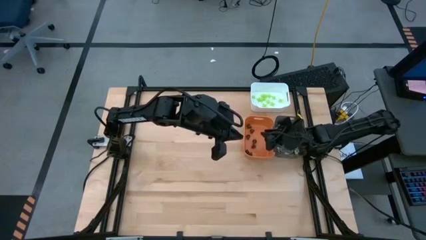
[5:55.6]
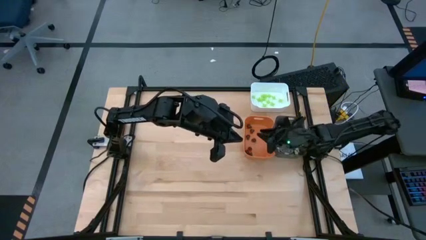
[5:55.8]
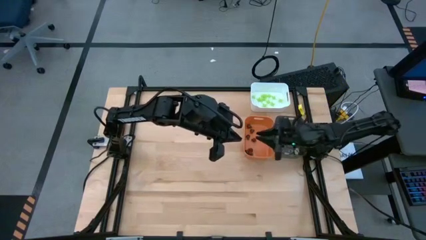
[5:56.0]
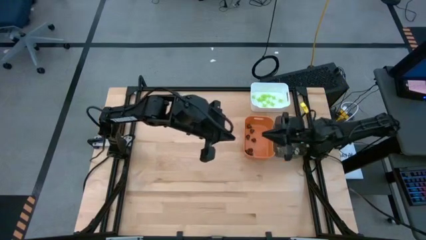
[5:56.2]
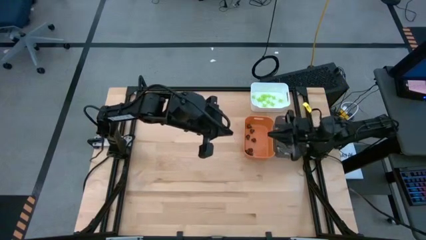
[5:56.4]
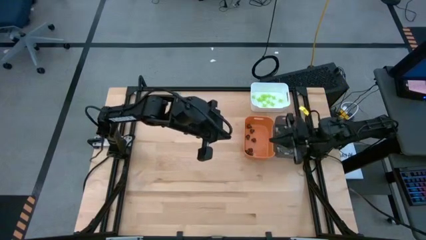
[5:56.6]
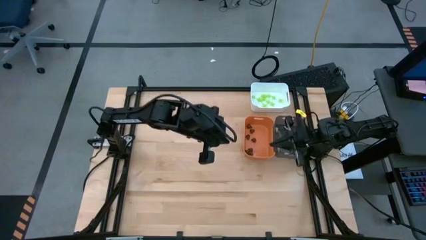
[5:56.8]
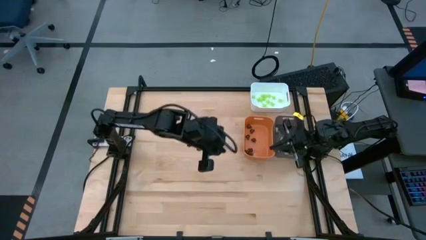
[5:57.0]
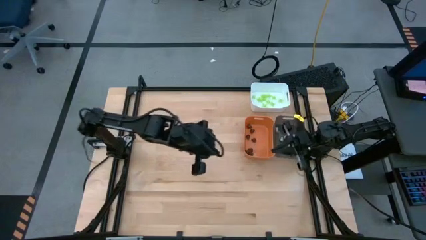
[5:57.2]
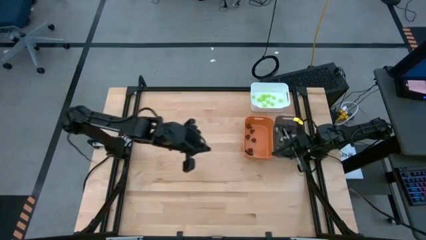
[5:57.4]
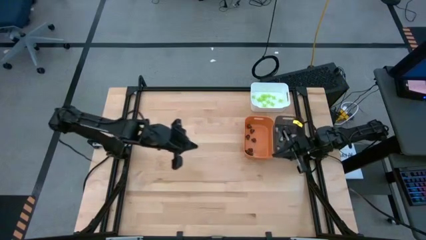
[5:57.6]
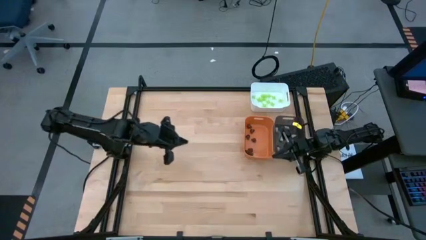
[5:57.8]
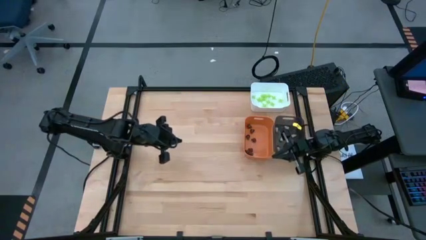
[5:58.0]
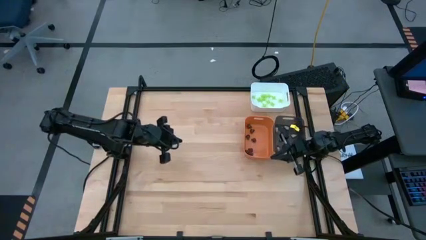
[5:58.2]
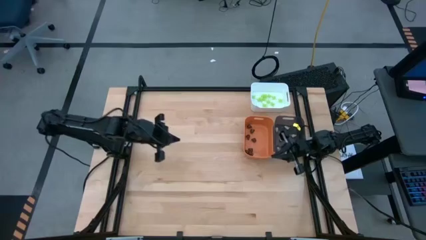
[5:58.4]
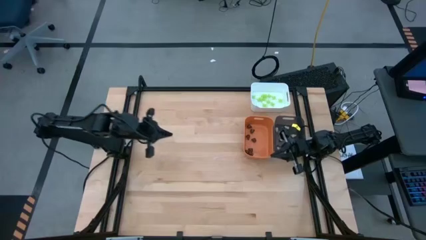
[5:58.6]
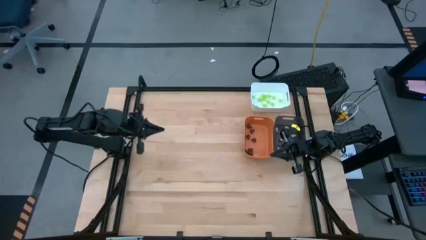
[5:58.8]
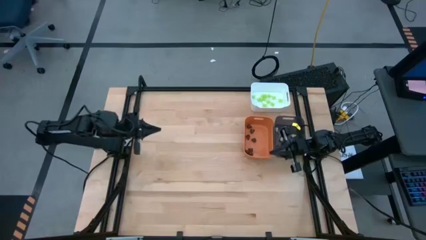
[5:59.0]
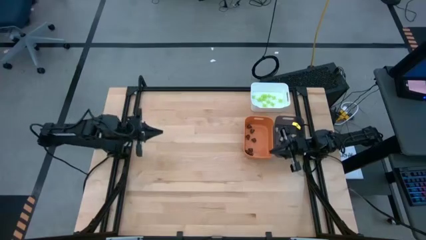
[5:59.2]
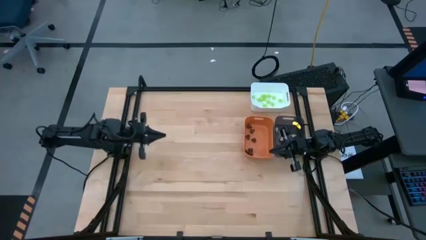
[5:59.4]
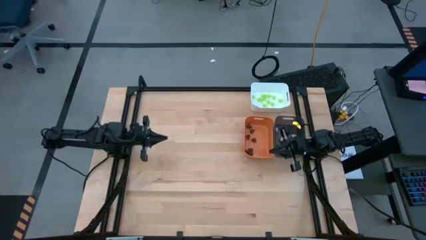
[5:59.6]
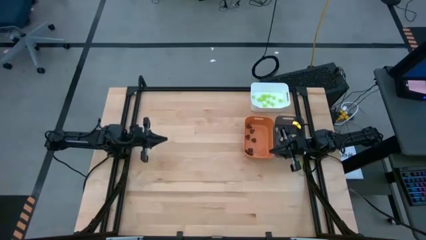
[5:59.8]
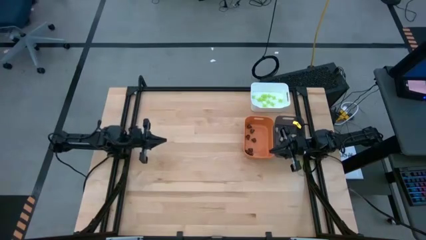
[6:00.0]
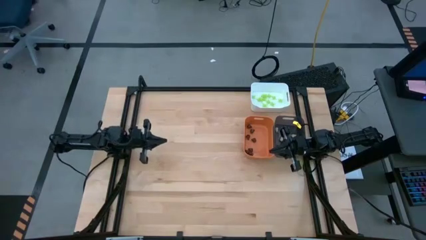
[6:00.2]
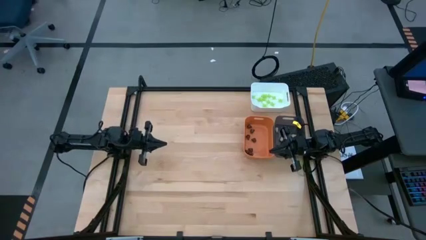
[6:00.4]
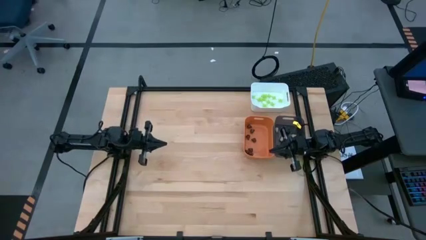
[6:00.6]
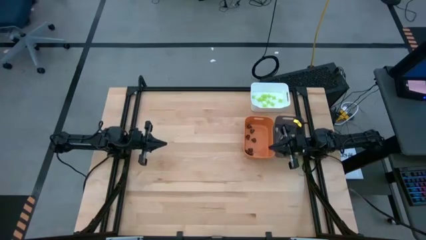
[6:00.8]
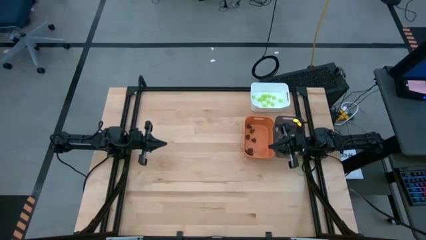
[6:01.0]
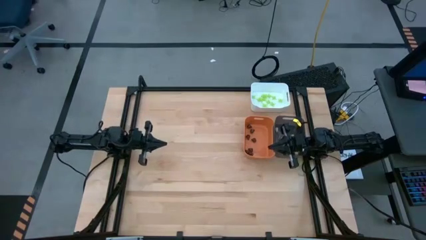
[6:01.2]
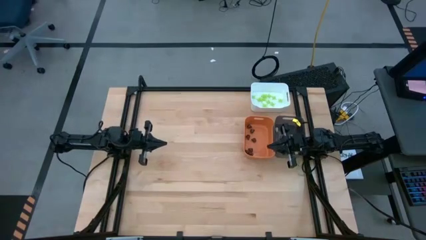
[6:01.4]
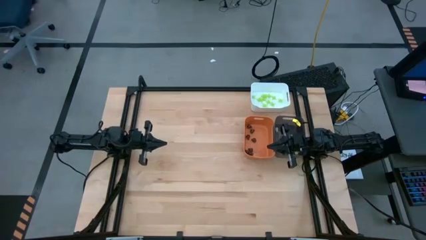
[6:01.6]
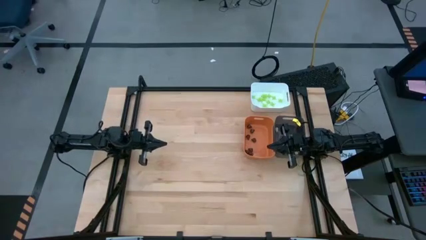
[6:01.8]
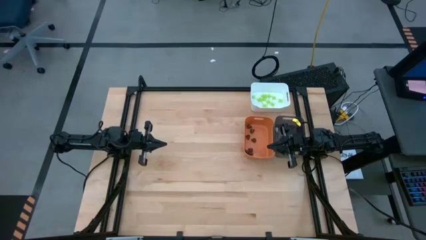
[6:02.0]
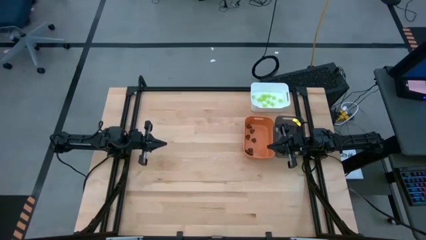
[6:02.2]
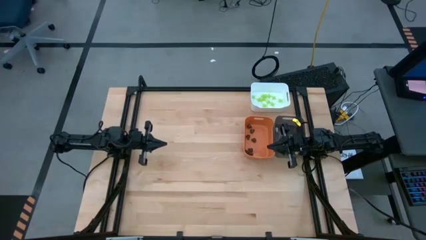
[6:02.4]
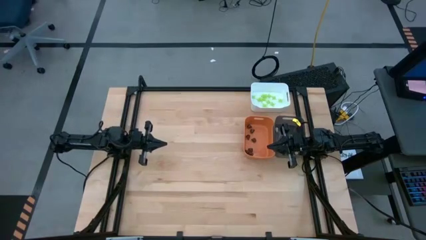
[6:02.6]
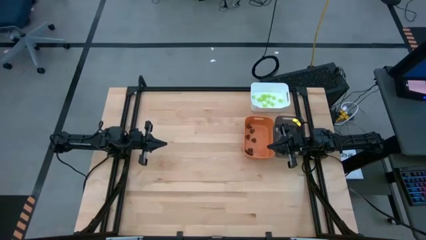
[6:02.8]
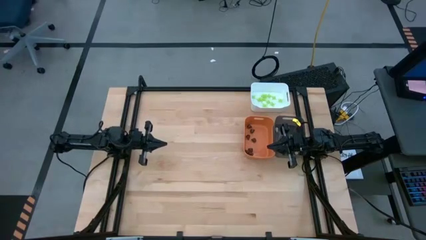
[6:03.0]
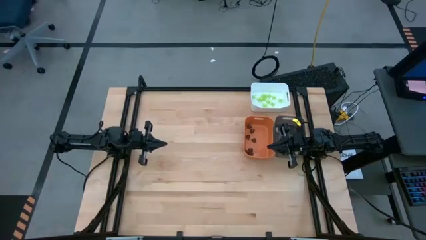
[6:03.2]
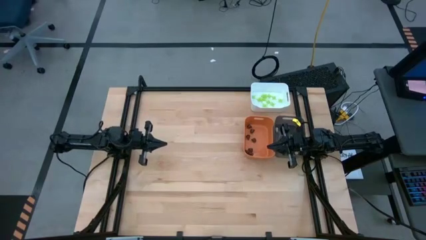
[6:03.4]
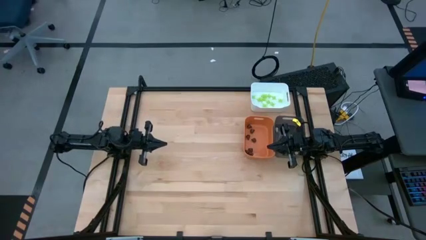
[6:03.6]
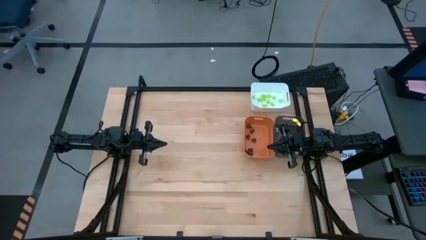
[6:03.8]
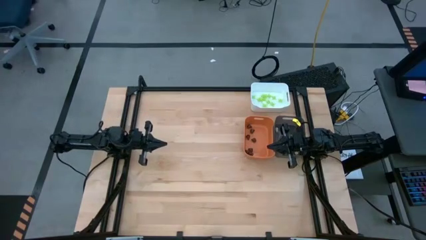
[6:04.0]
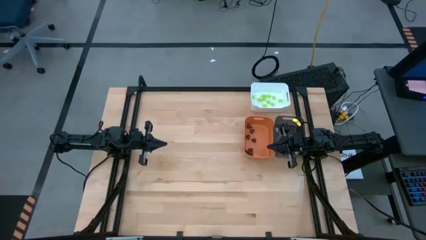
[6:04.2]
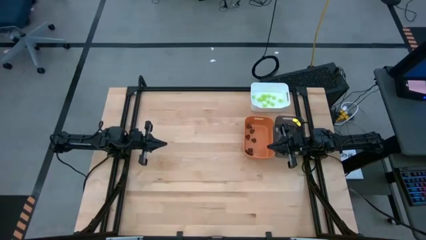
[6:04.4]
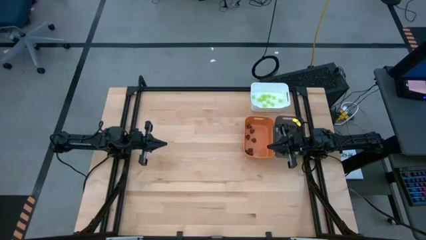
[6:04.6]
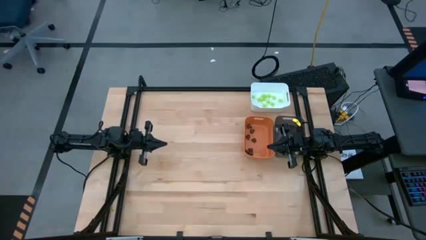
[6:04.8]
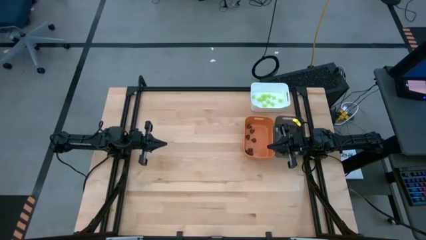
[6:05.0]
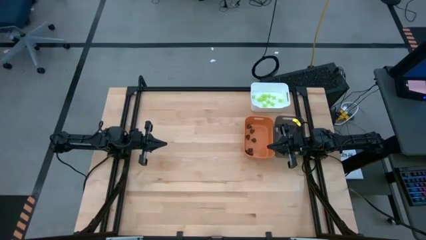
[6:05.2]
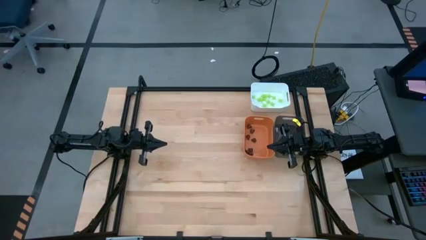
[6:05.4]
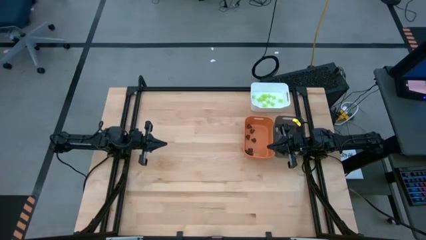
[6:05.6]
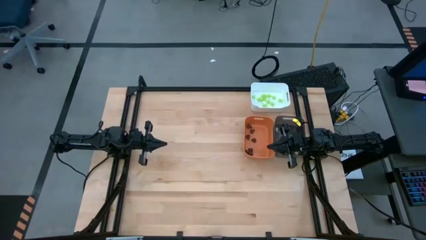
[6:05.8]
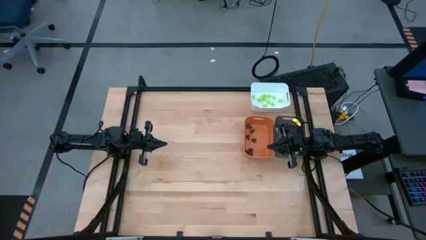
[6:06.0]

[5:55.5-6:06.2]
Task: Sort Halloween decoration
Return to Home Position

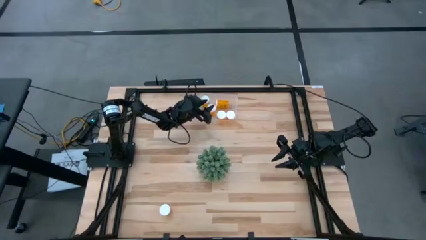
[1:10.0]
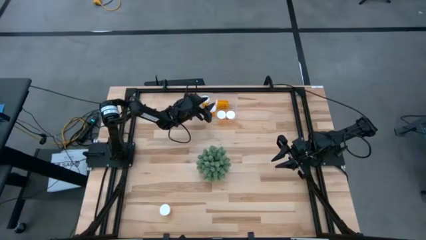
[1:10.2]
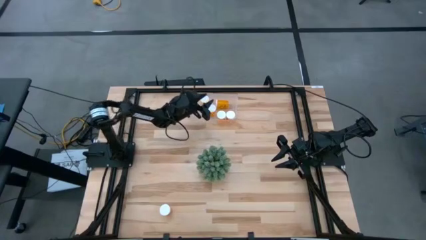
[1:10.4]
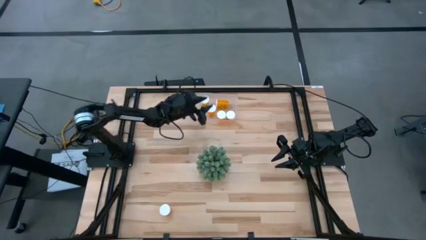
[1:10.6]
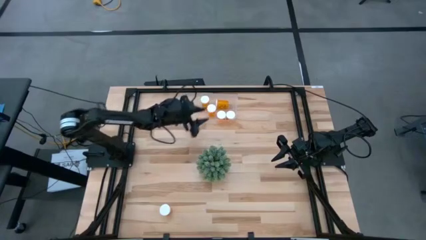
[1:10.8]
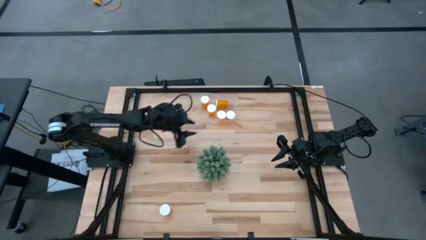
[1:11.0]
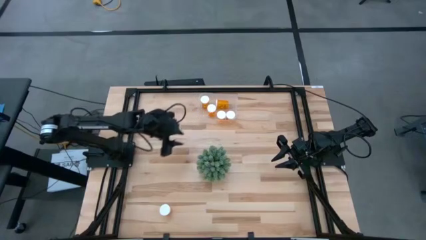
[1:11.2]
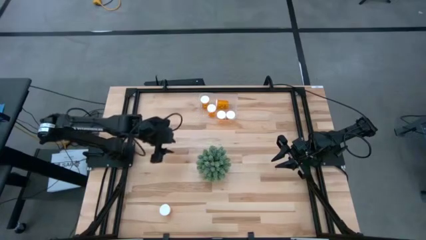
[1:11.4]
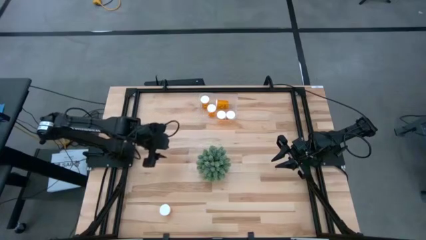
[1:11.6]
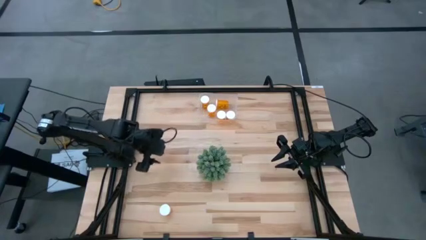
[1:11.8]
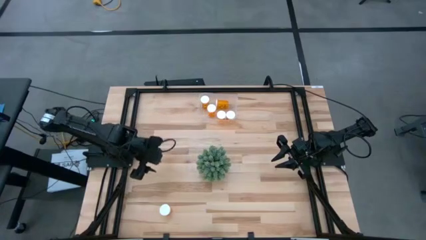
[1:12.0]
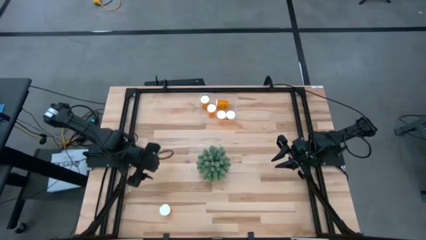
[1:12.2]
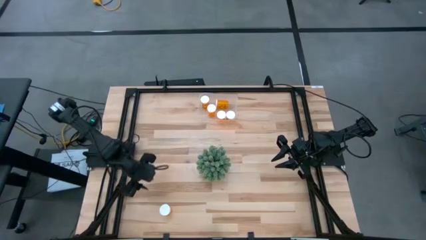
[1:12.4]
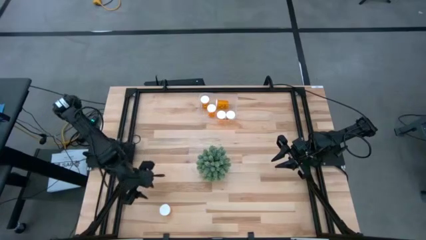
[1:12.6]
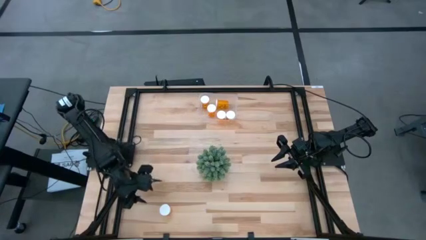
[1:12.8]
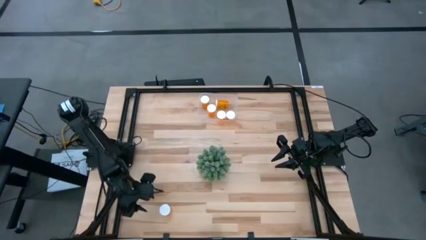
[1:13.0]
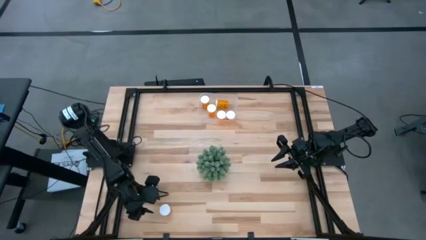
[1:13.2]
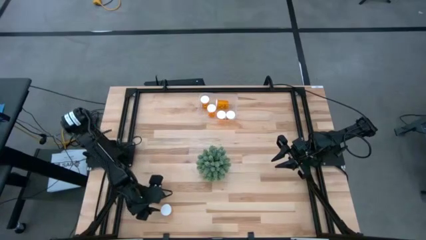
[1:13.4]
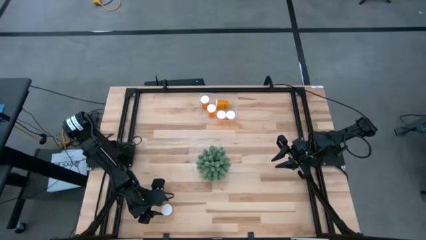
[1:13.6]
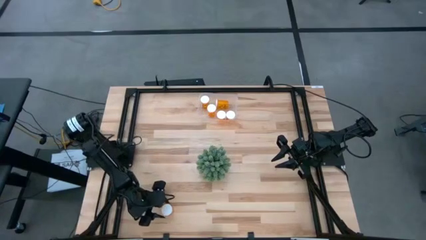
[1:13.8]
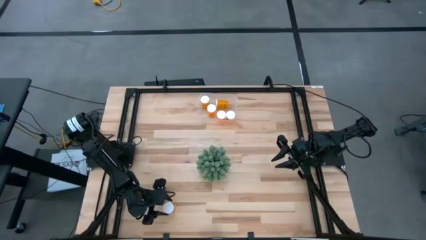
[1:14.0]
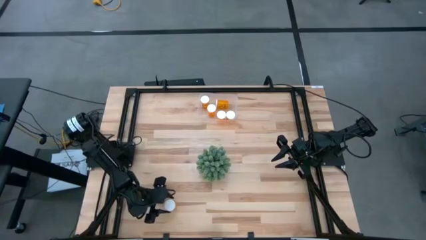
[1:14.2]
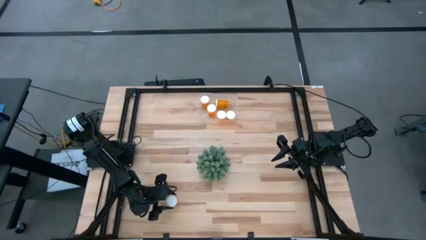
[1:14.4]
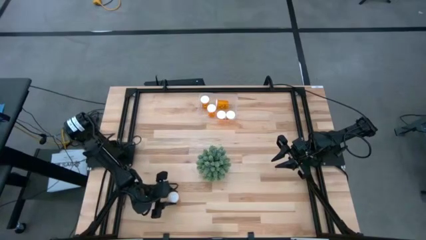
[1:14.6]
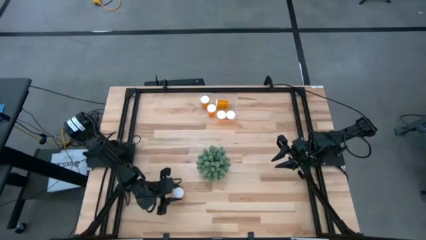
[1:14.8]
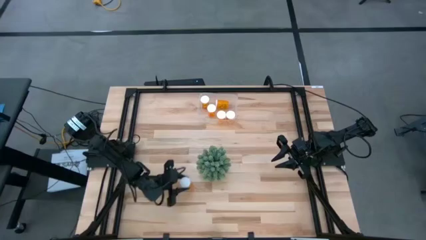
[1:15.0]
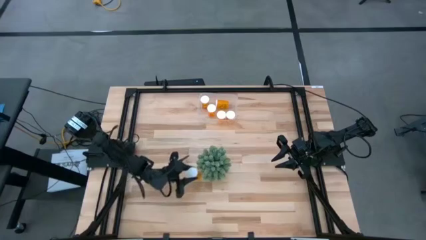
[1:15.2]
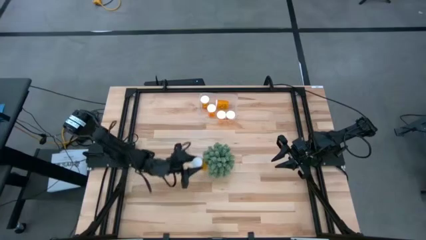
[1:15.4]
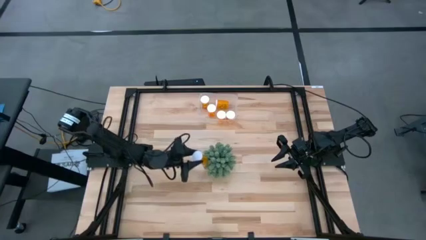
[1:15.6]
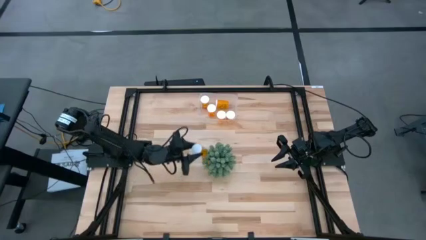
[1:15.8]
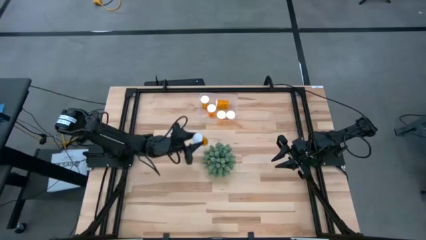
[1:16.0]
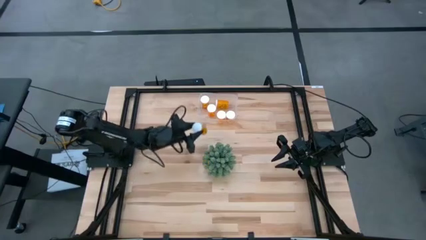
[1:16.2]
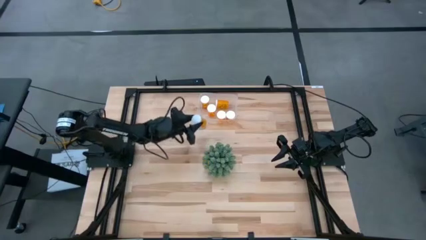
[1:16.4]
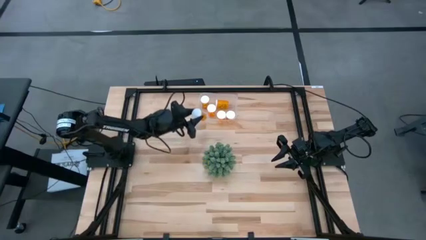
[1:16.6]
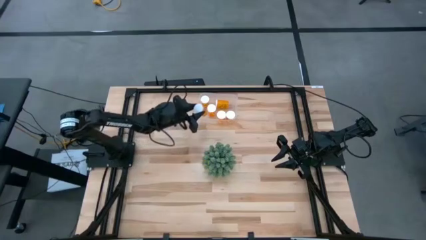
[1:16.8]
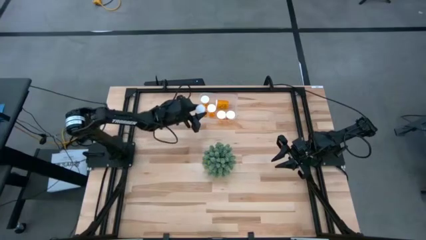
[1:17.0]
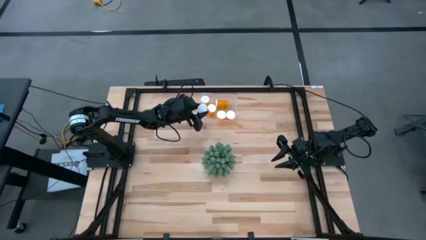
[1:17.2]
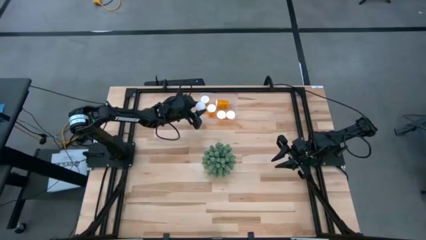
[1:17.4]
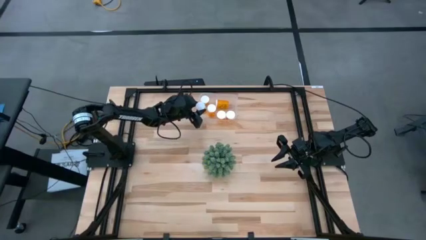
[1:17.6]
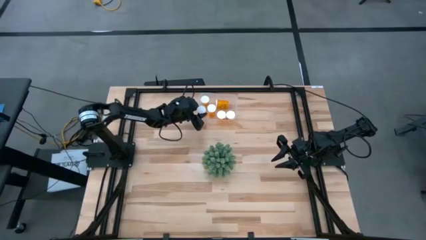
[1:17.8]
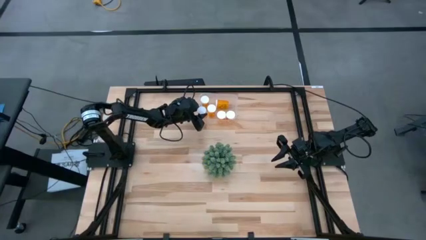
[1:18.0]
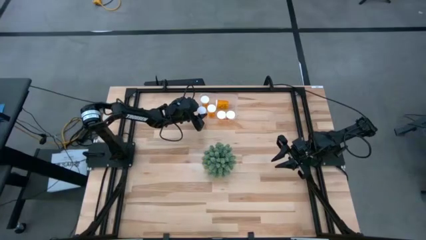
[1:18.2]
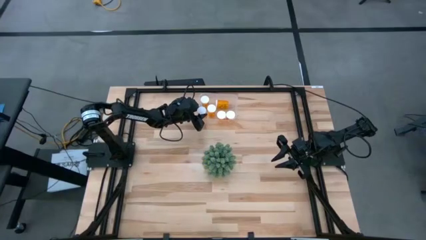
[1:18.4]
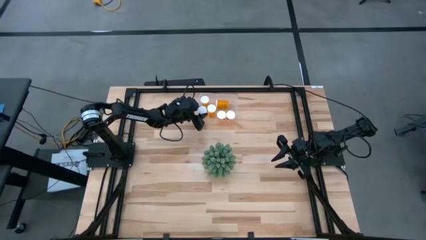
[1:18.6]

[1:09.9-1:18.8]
Task: Pick and place pill bottles into a basket
Put the orange pill bottle into the transparent bin
